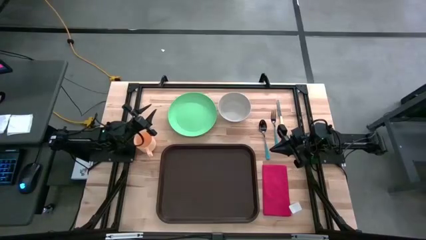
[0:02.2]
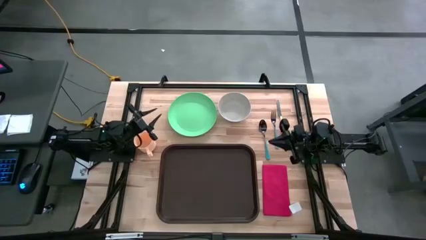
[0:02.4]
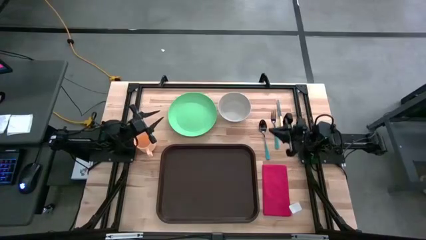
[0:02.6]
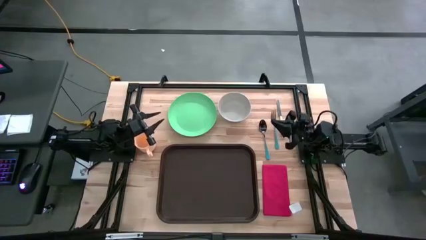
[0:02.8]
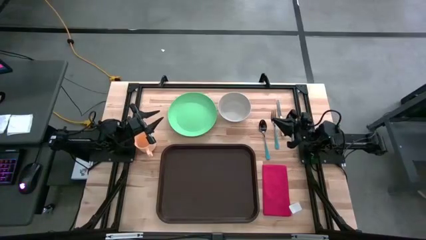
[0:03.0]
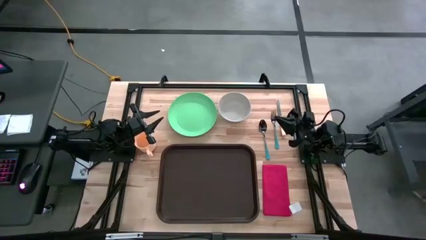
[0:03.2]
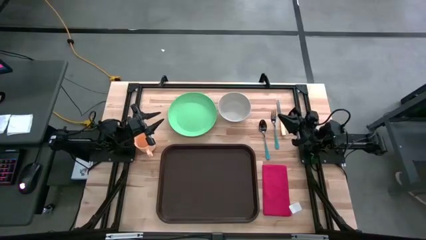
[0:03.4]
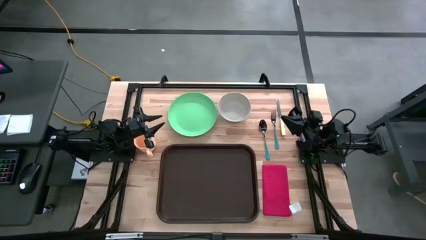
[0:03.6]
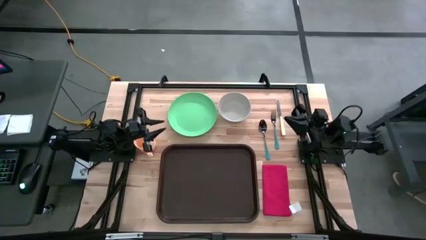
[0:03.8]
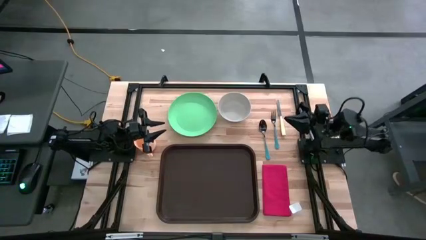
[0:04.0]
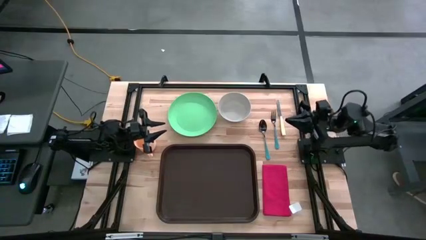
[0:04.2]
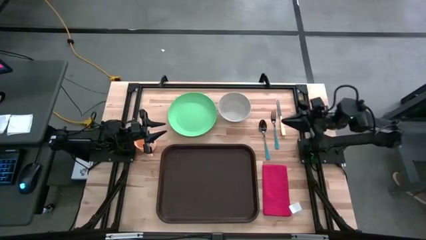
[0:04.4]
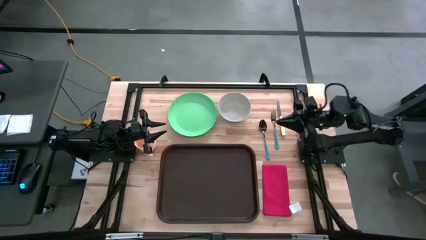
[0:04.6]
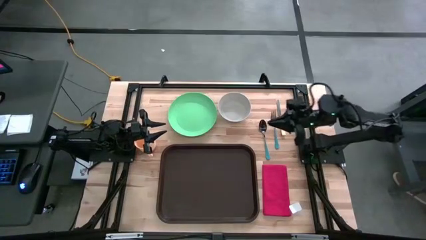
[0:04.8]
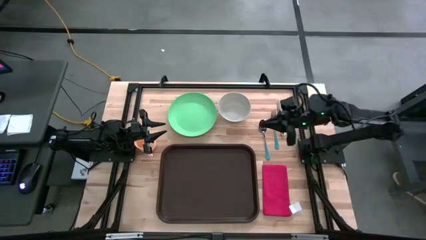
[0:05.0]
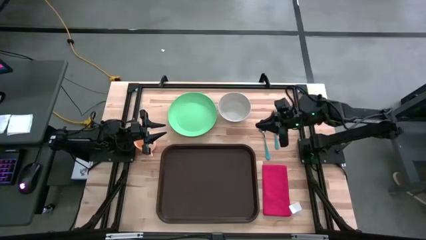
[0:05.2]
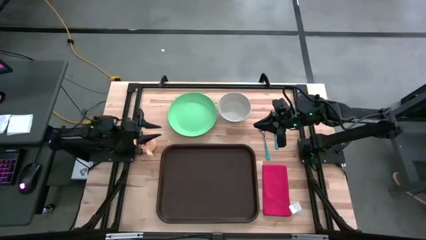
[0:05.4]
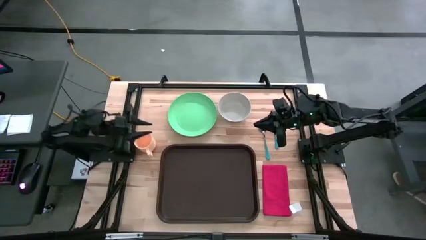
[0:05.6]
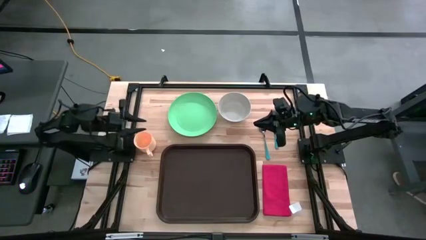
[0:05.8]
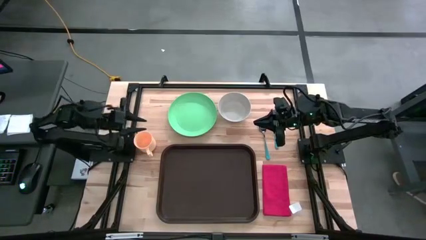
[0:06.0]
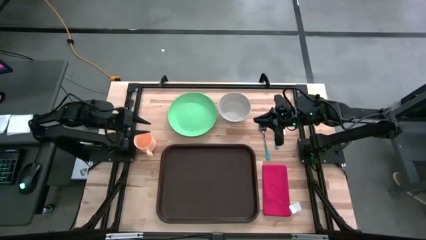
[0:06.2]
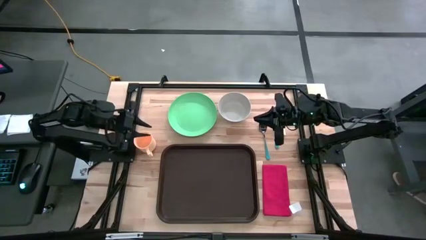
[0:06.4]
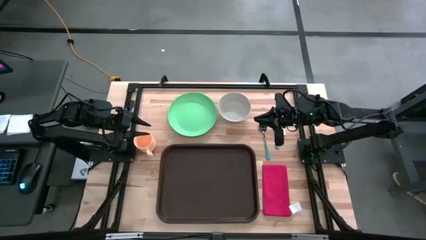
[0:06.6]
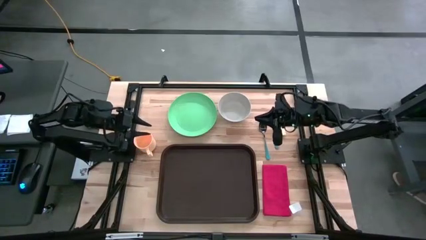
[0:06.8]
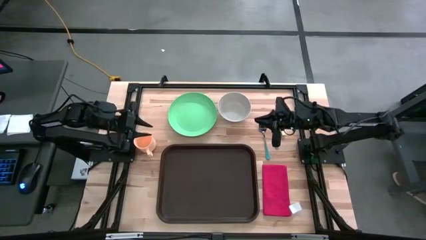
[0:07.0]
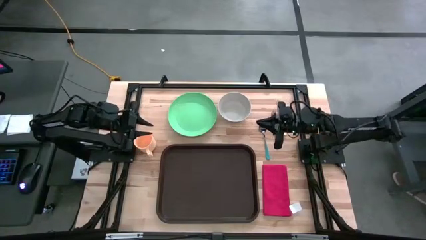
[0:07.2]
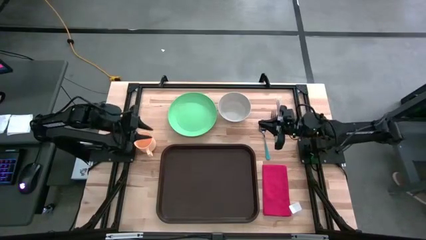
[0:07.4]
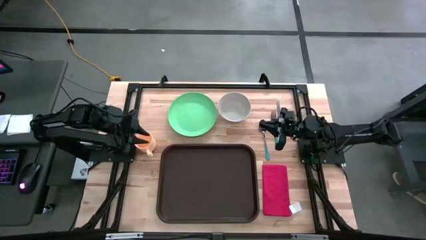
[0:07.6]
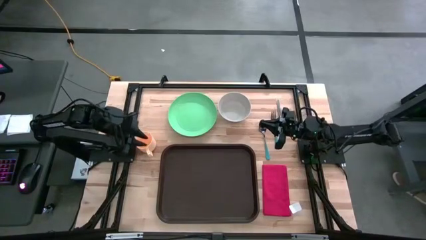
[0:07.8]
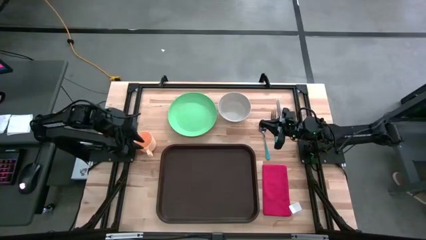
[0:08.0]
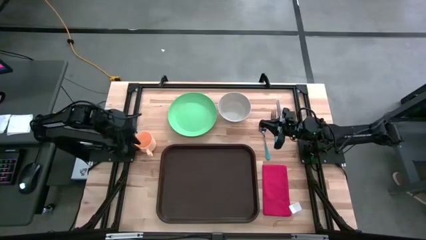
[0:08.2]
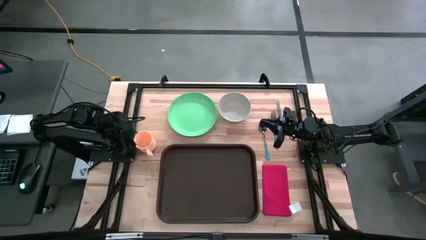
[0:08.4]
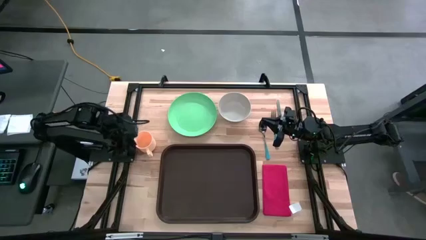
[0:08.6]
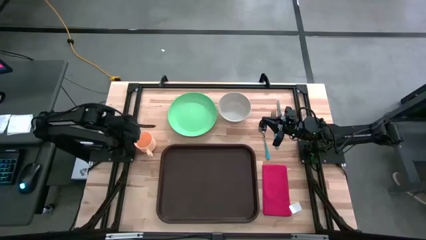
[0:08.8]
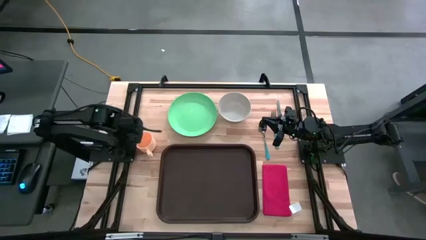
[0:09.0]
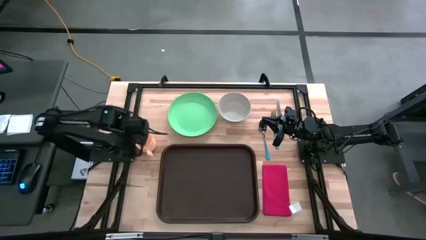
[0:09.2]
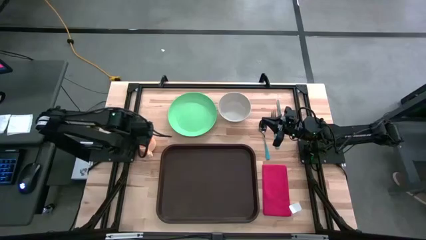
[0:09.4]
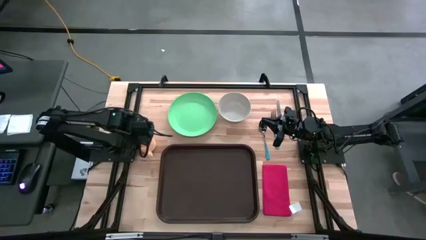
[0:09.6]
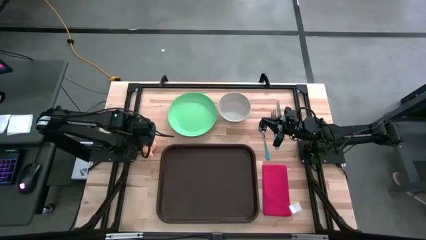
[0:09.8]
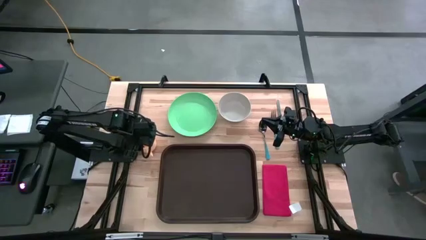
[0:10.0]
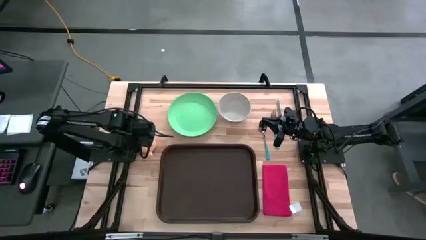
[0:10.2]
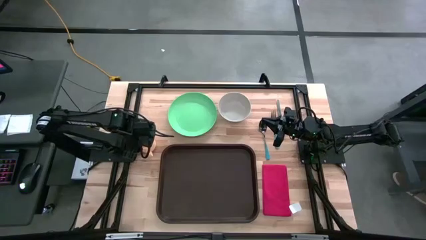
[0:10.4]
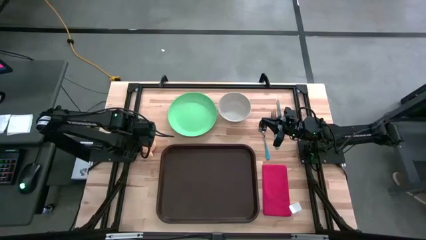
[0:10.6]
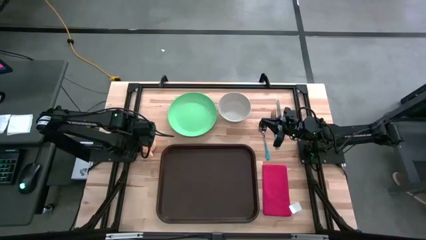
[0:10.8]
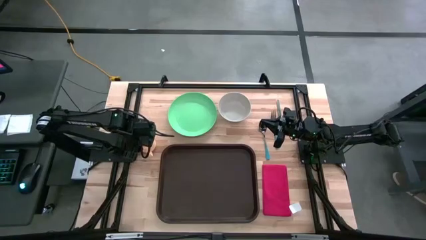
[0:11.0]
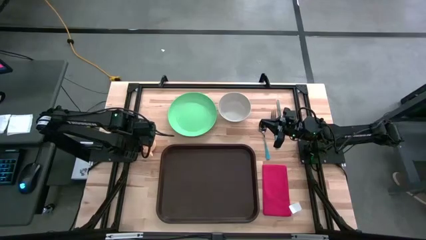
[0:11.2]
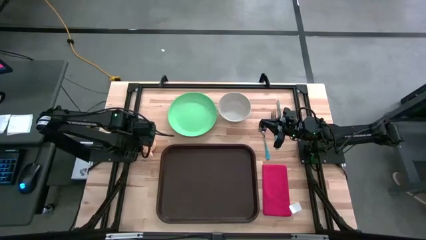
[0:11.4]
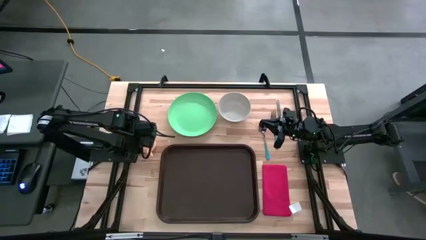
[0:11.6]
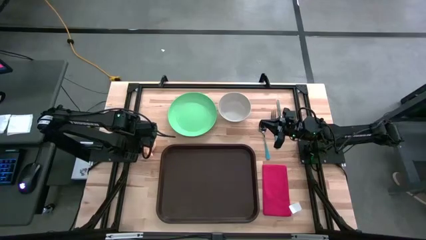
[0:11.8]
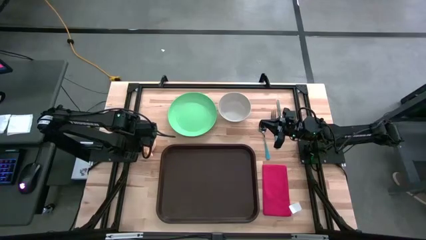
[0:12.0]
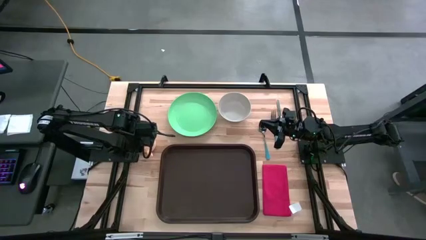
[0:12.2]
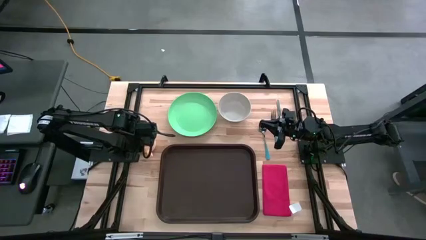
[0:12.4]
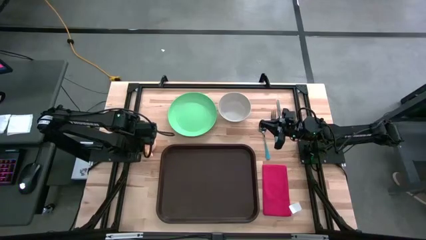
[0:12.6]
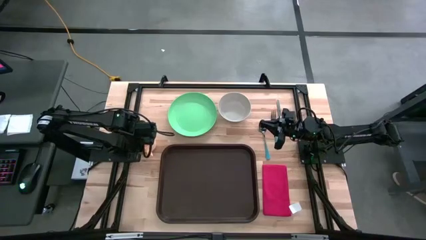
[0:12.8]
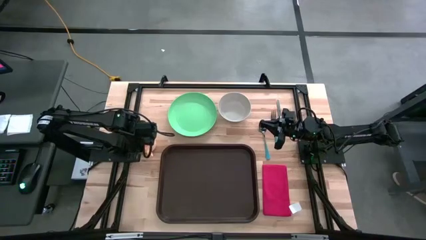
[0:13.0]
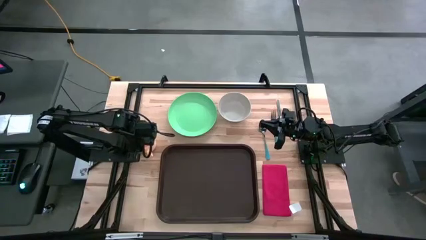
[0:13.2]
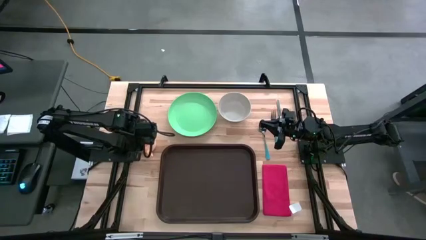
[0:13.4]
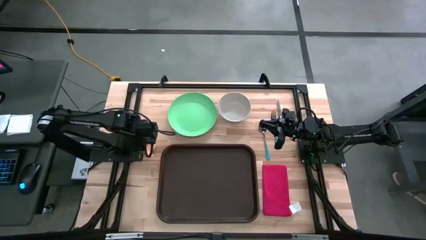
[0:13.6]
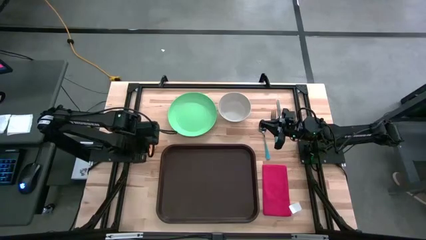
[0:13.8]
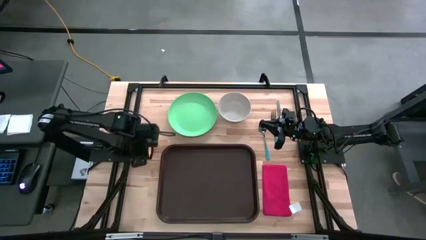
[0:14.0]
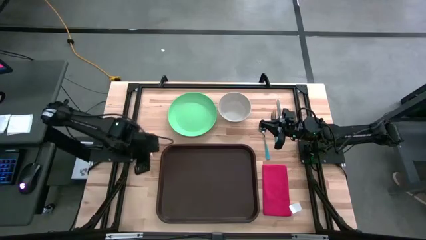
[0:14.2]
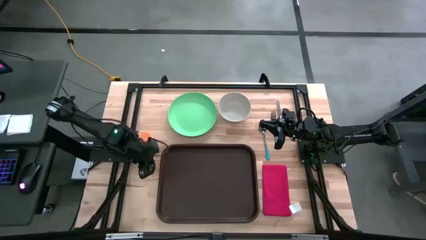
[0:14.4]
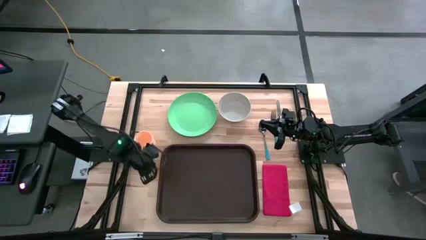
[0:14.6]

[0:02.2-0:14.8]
Task: Set up tray
Put the orange mug on the black serving tray

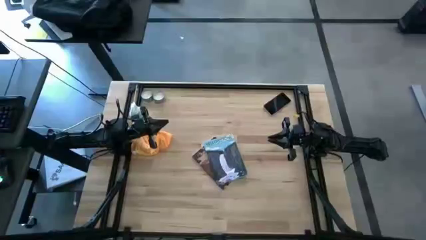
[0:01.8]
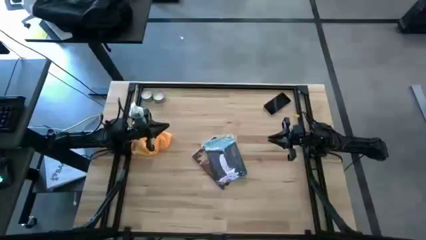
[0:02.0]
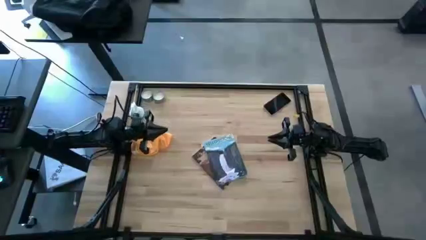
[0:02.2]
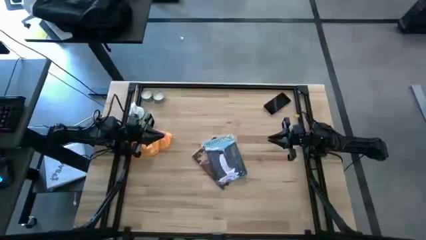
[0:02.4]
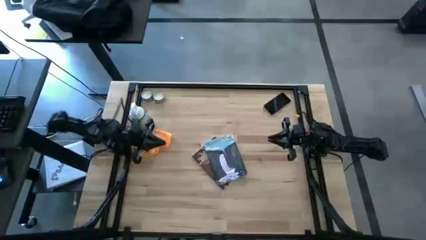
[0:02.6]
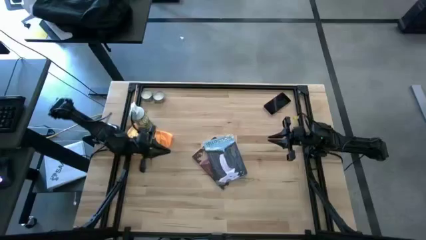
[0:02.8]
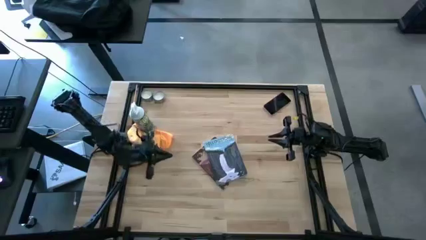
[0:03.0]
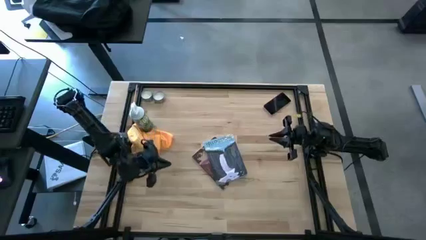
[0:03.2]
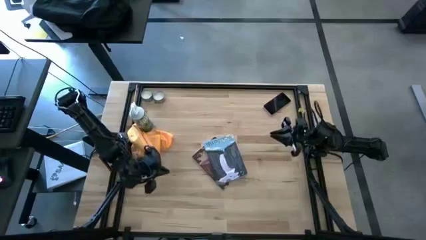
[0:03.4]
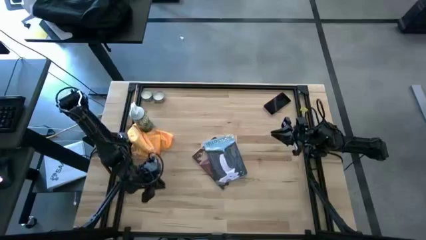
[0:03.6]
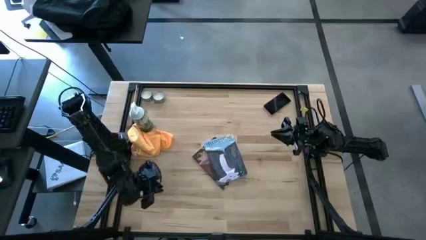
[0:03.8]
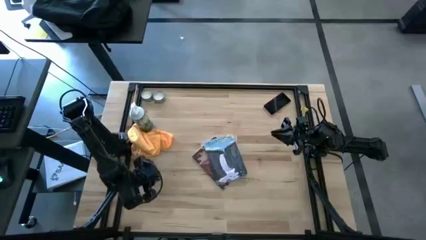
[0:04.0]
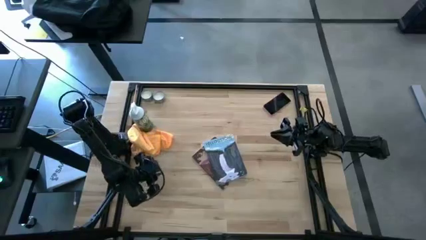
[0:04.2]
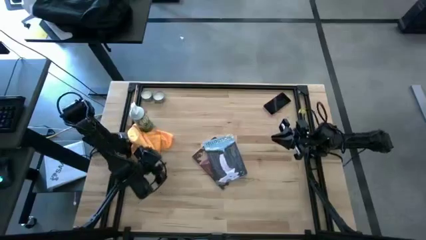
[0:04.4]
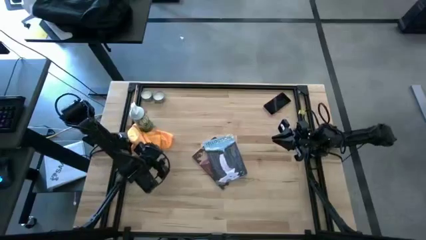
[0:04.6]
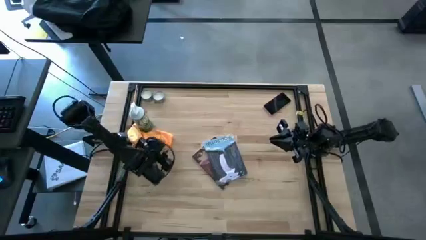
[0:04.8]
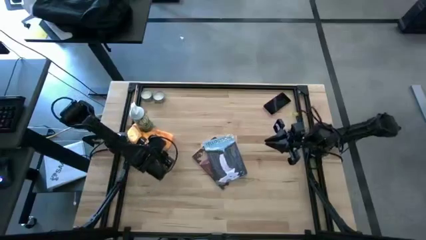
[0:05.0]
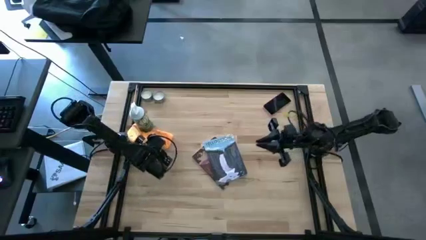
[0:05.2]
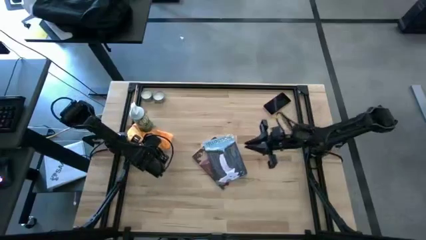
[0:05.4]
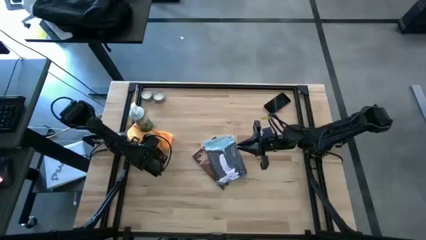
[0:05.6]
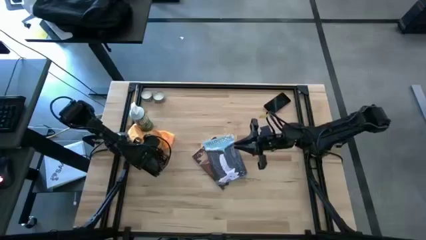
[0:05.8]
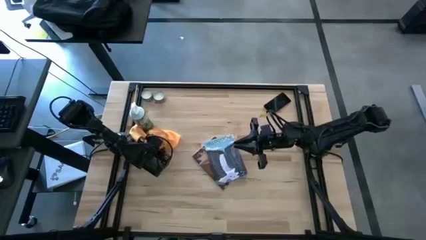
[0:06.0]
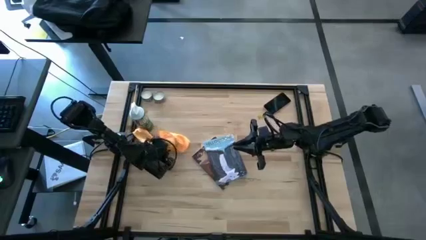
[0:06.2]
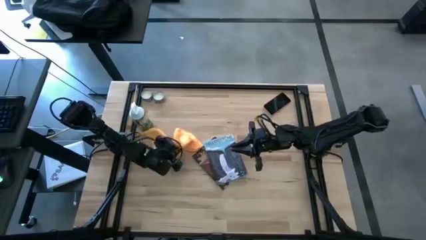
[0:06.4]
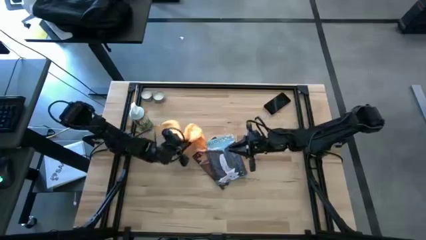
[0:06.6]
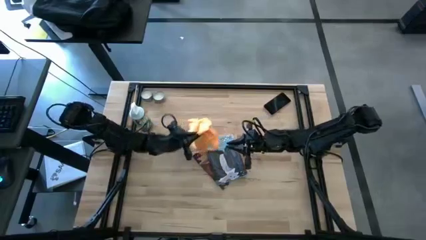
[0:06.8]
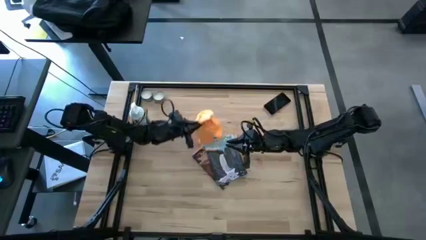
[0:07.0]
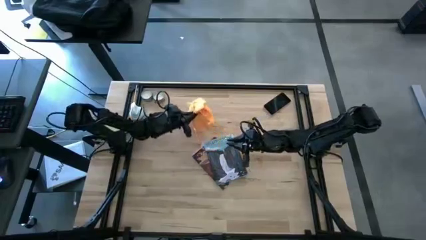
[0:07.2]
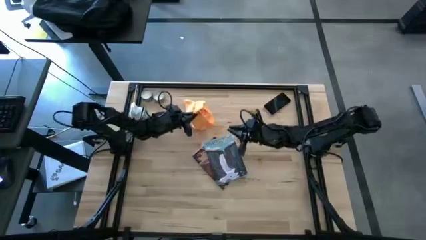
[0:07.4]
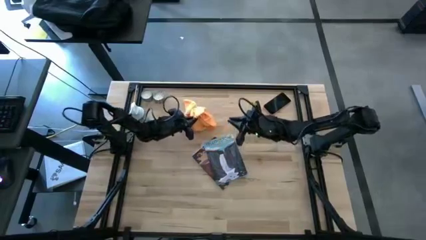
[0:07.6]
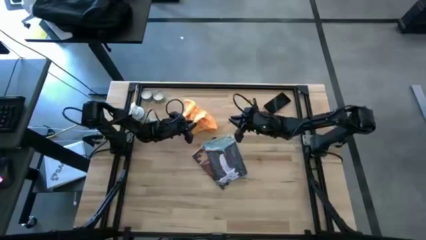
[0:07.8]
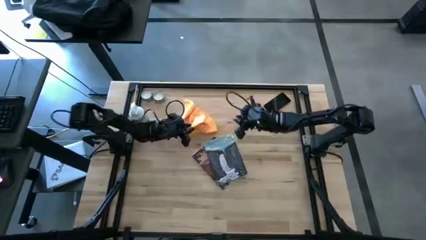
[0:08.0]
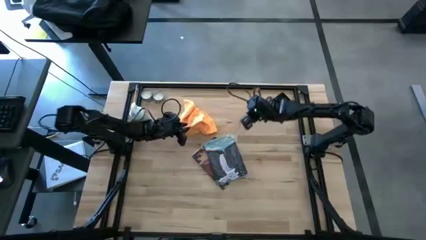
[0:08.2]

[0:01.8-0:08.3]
Task: Apply microfiber cloth
Move the orange microfiber cloth to the top center of the table
